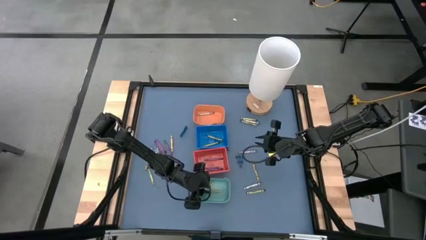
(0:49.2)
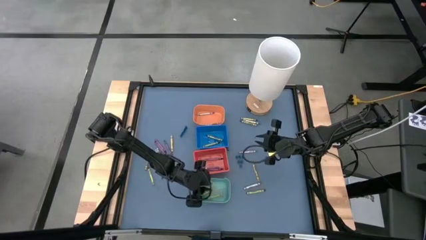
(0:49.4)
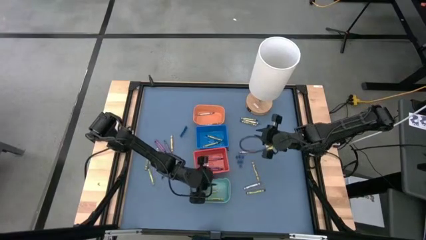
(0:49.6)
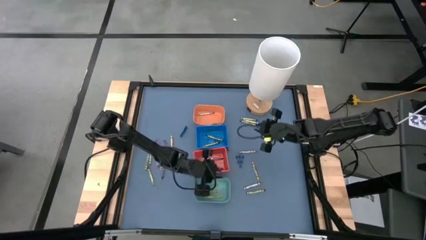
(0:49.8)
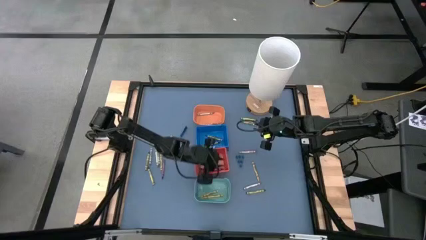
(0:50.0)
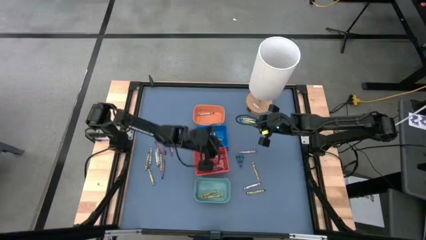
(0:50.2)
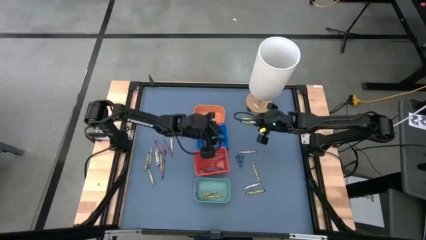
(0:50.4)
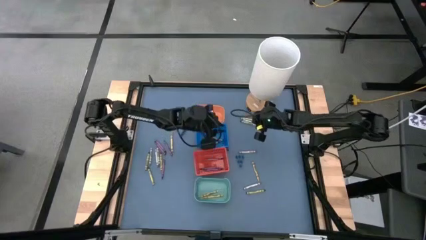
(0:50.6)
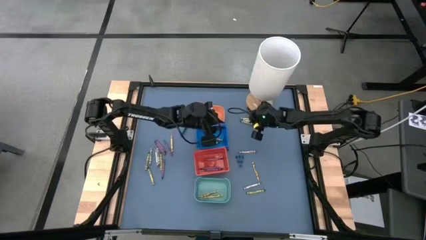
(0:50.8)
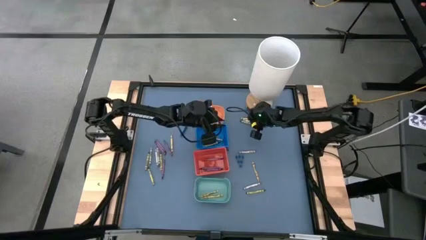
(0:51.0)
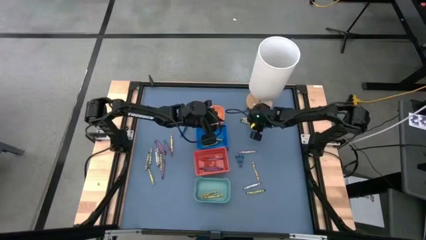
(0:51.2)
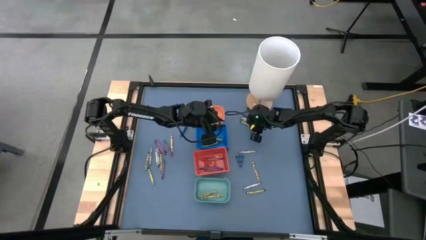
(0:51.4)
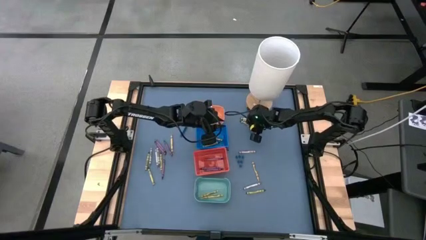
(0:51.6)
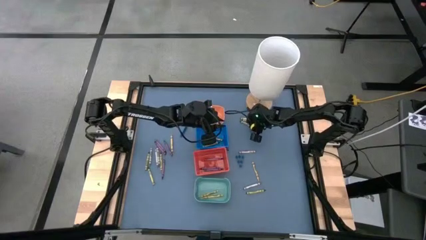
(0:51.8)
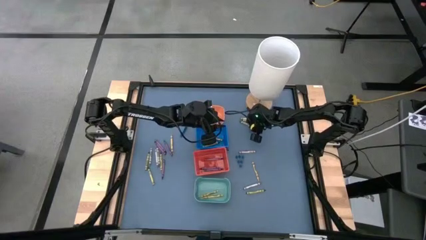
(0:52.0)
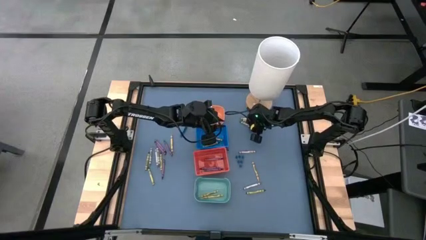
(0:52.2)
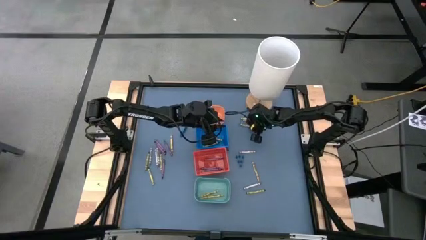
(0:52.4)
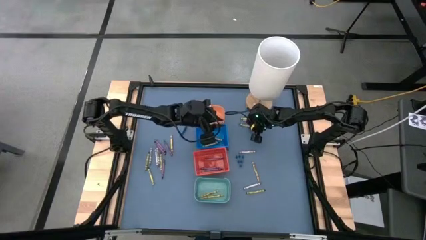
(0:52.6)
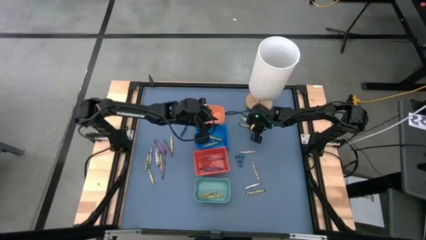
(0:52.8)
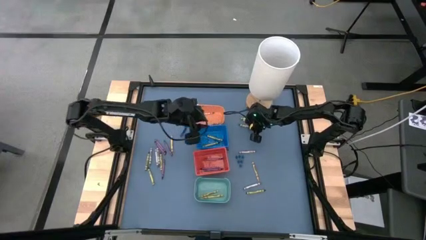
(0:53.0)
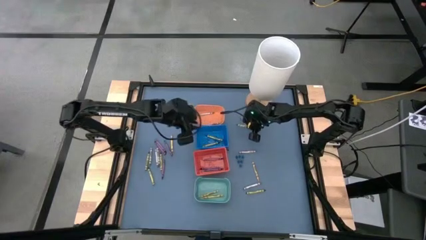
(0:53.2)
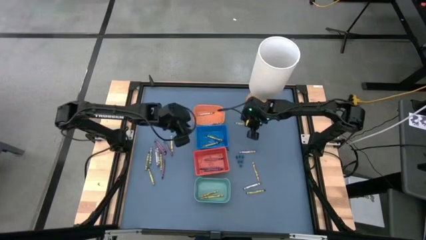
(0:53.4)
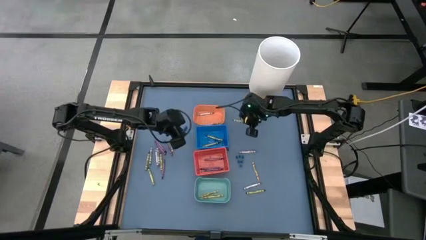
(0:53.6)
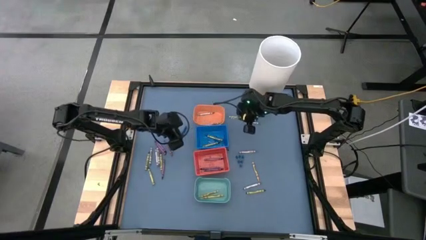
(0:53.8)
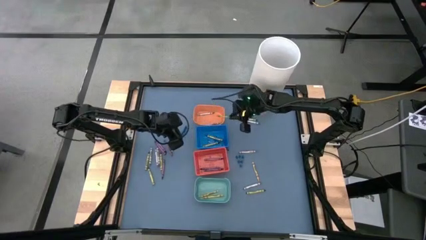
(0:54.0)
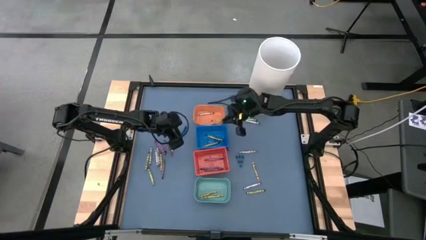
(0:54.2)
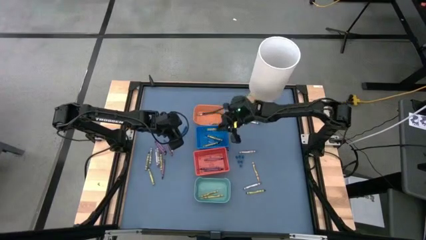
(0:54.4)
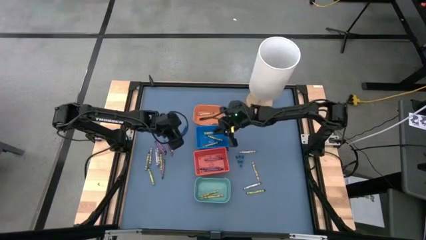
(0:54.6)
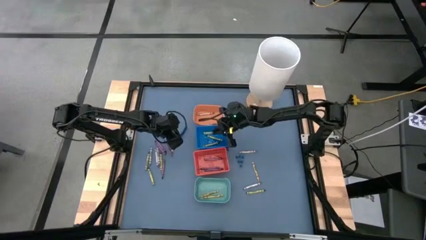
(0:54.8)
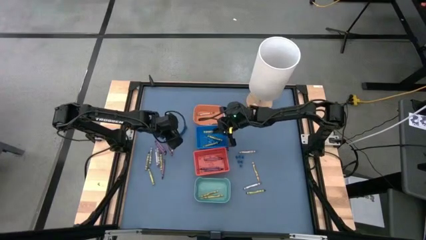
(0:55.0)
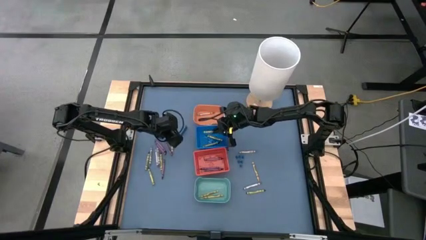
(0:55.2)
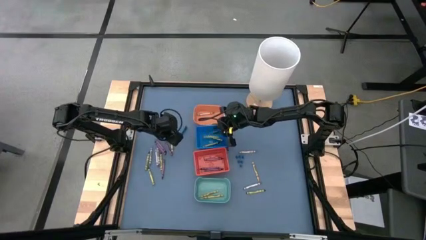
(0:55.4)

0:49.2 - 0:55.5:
Task: Sort crayons
Put the green crayon into the blue bin

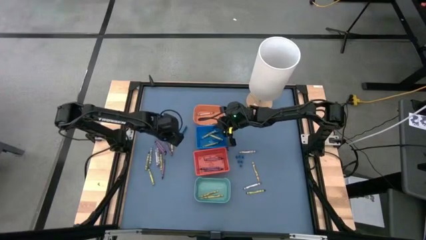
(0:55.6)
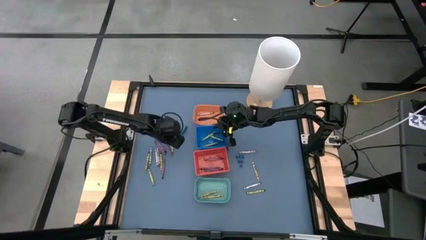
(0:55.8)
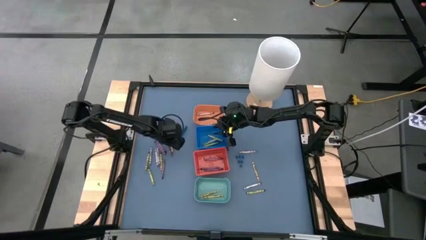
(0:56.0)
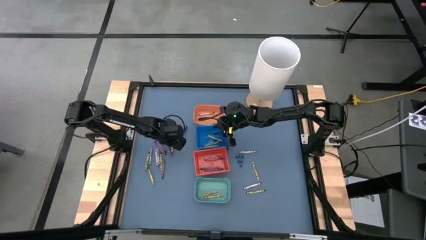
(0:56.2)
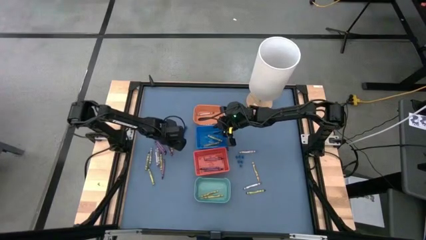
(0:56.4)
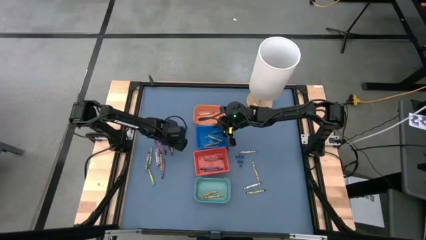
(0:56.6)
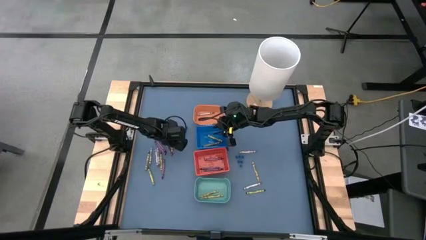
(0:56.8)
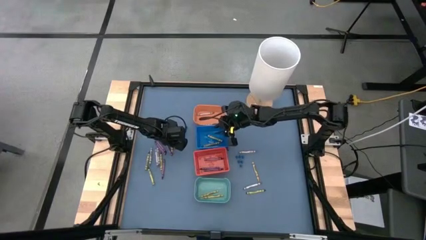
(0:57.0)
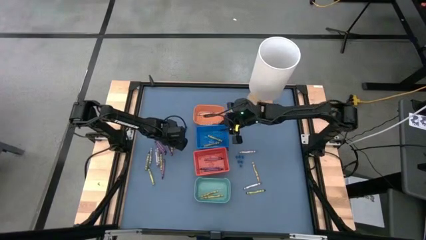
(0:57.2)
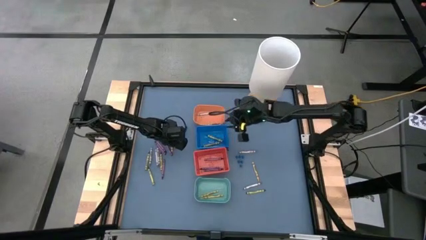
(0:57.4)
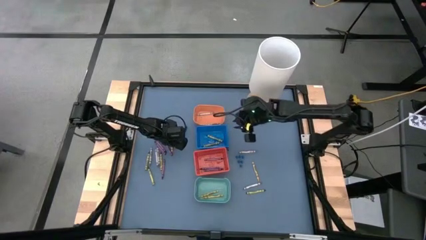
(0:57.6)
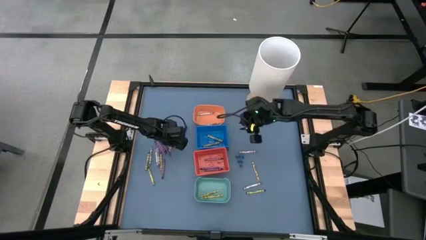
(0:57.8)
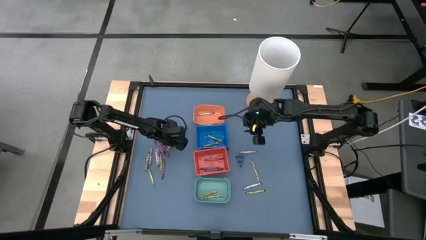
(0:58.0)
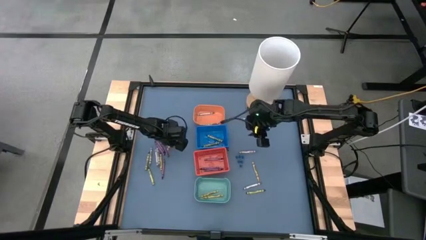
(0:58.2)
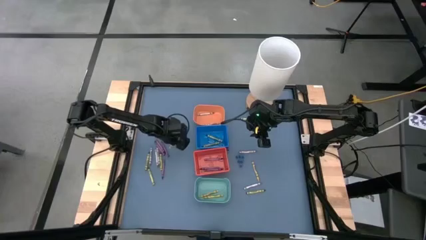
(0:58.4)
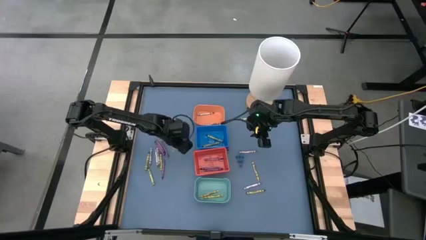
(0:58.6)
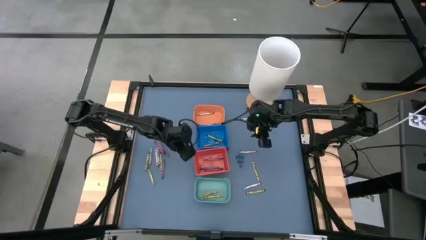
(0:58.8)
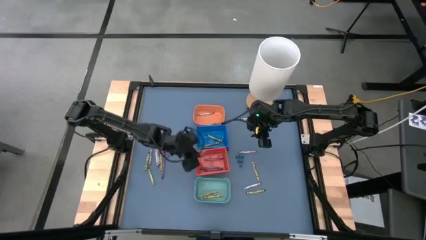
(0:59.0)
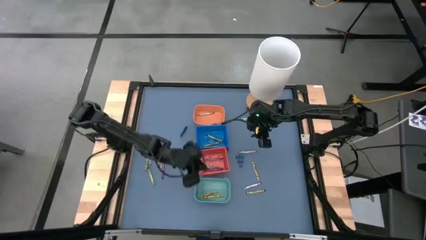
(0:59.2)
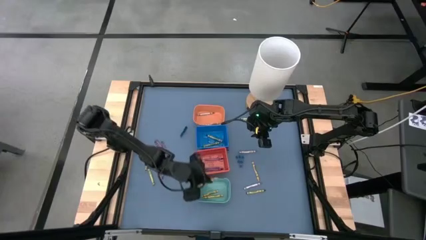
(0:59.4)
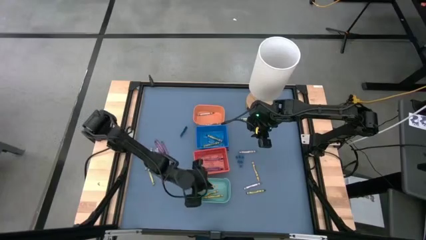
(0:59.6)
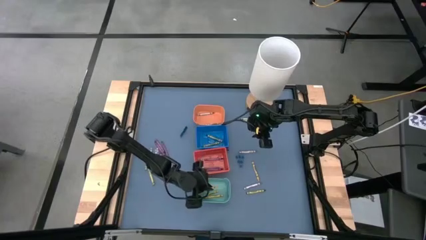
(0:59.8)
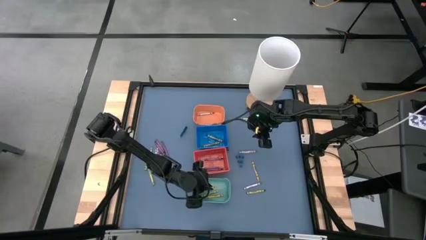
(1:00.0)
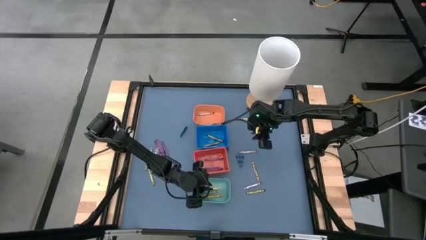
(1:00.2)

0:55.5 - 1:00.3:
Put the yellow crayon into the green bin

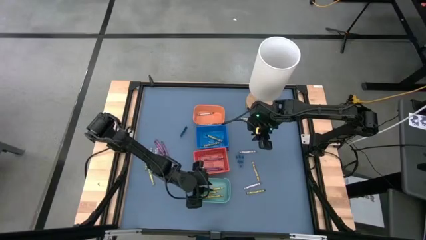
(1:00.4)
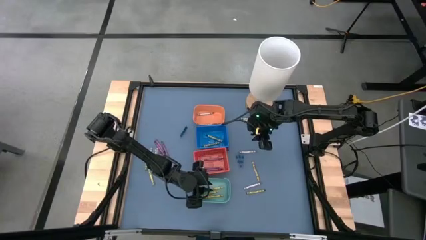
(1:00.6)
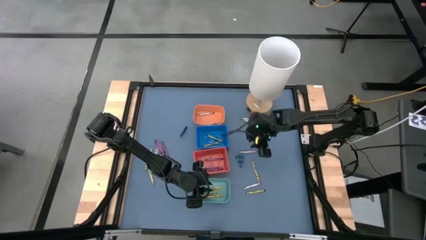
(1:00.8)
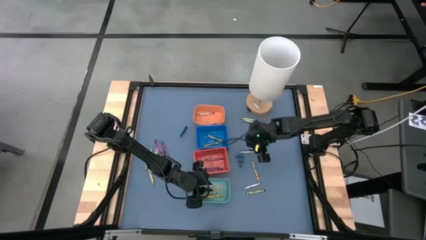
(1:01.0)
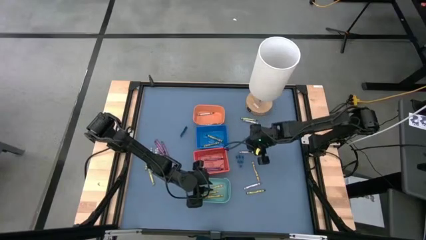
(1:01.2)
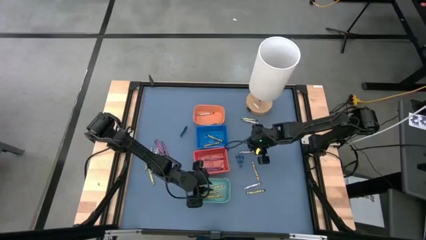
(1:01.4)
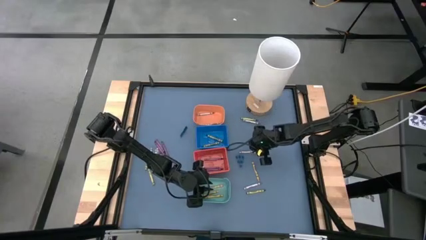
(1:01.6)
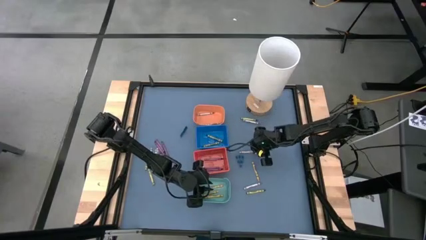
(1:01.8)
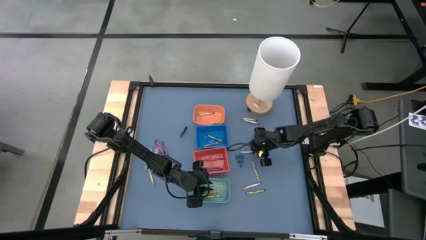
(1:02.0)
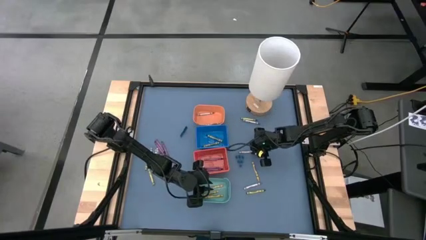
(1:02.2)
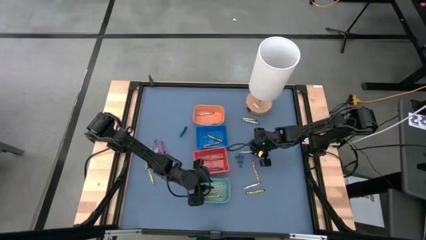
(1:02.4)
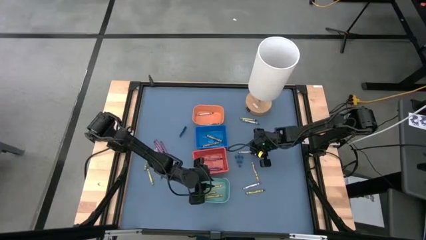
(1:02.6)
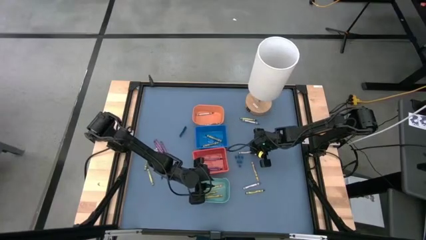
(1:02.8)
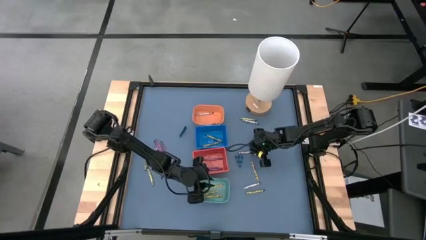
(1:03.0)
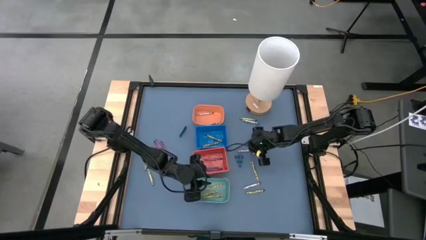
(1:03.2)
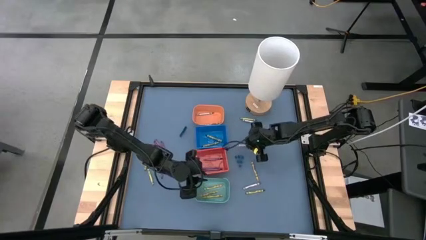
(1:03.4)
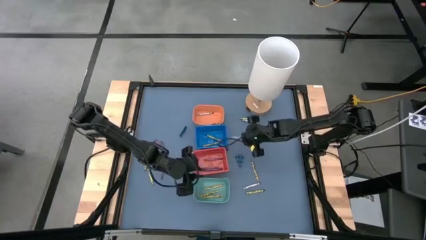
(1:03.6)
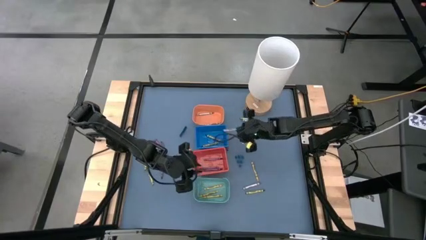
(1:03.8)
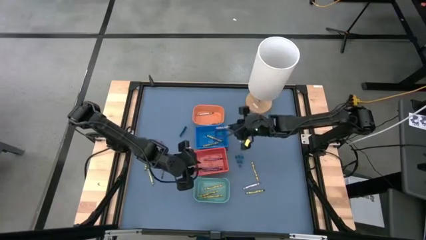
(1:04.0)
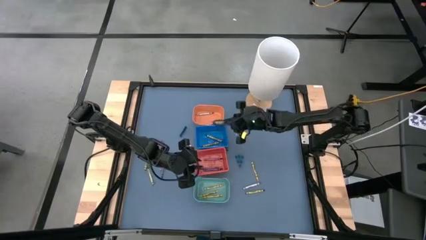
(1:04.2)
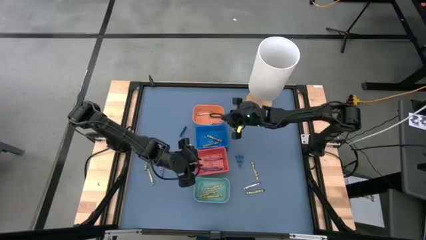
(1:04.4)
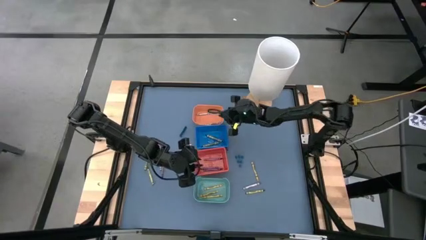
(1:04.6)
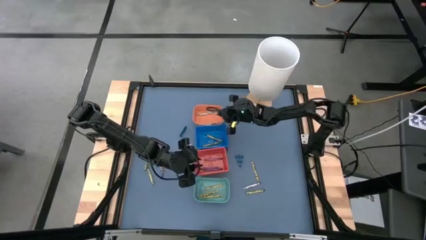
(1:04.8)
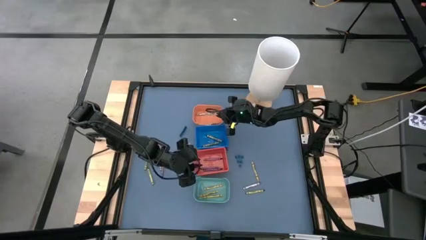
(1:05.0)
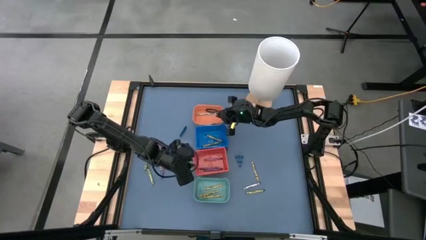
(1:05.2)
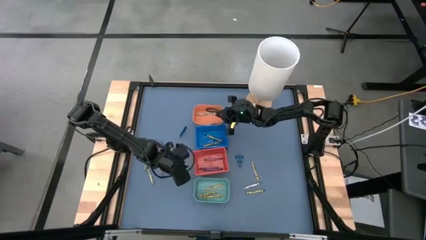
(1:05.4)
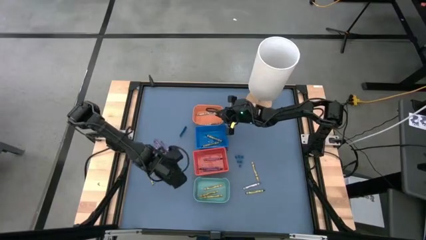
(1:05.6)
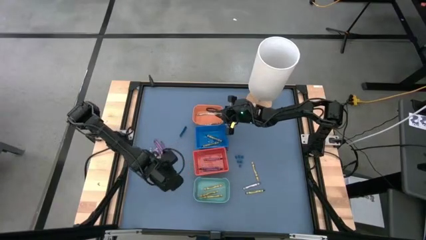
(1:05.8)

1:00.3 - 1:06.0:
Put the gray crayon into the orange bin
